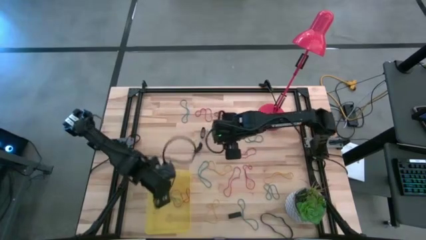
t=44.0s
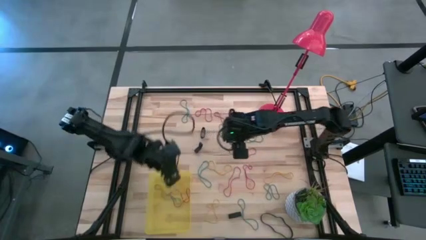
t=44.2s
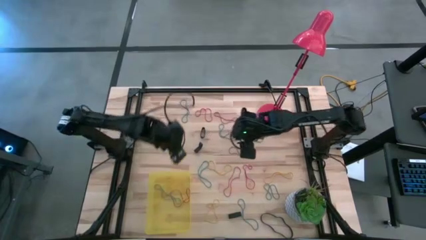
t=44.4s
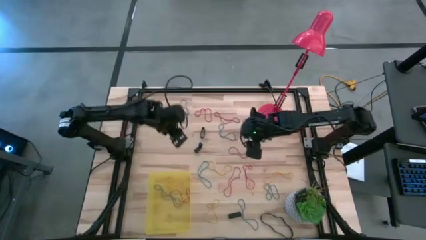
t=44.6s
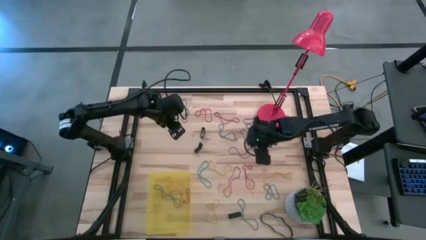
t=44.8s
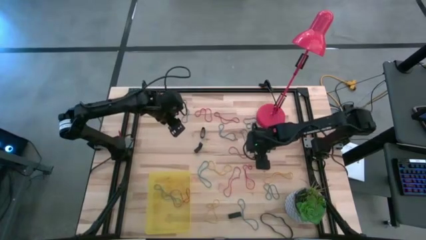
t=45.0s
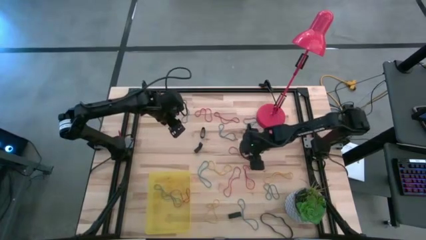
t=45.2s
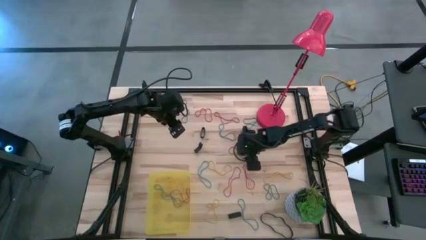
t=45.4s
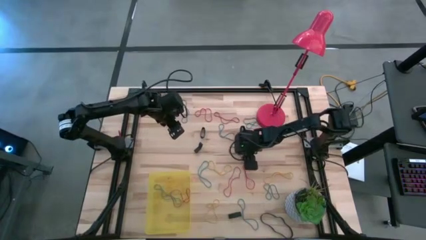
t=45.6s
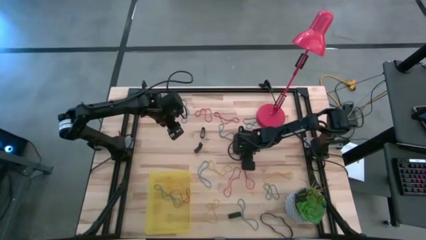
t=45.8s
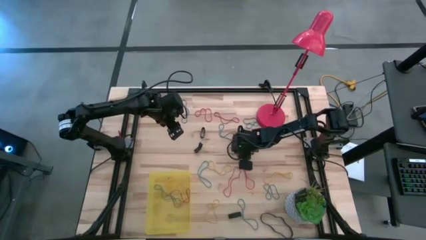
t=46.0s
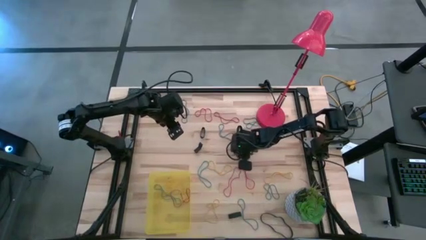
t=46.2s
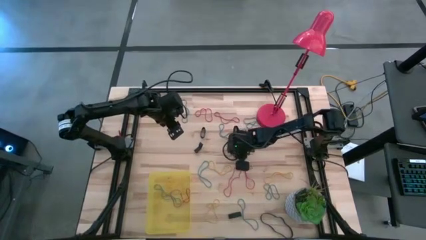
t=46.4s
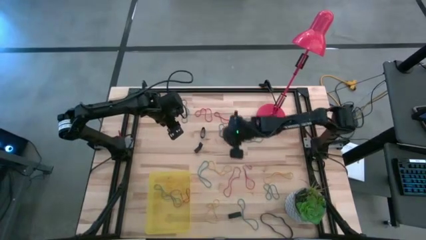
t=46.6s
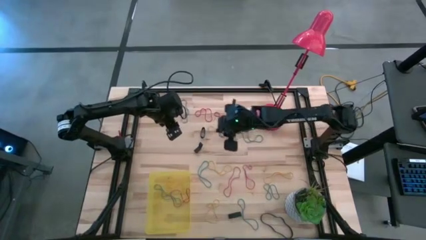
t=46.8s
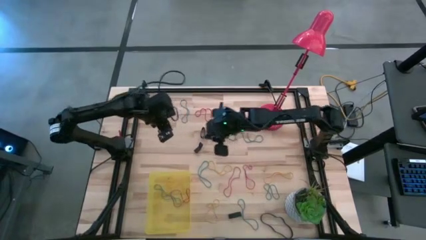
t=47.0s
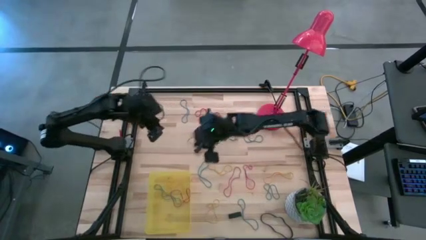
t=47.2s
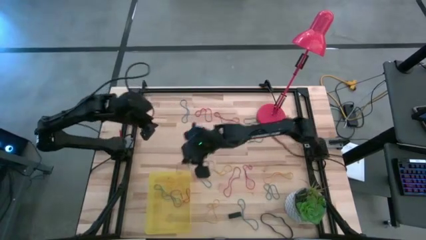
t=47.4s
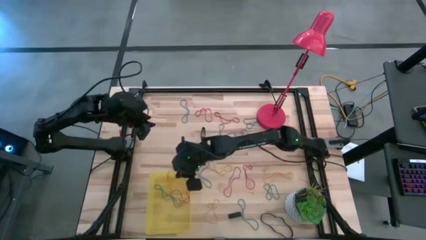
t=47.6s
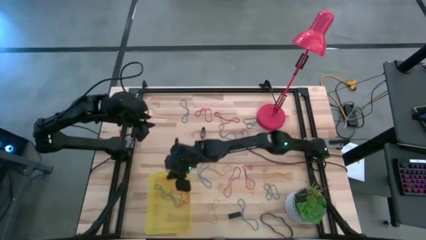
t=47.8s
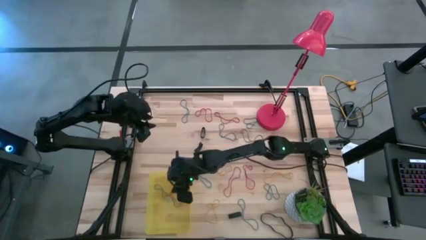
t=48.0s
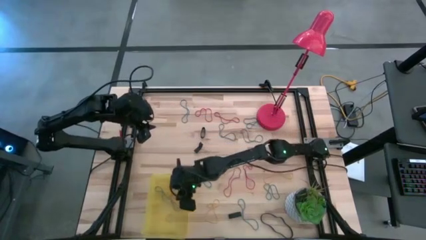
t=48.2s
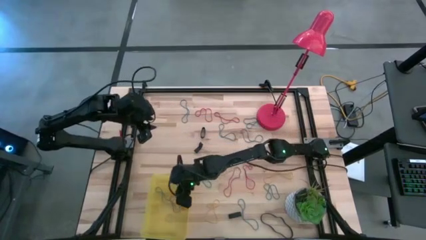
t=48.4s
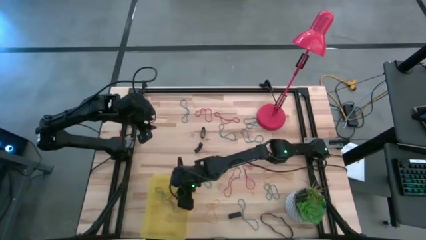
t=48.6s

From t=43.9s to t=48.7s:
Task: Pick and place rubber bands into bin
Put the red rubber band into the bin

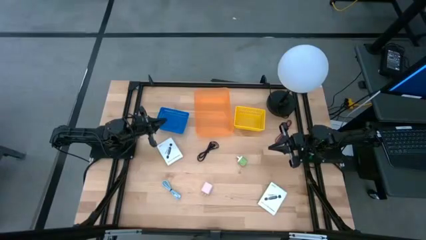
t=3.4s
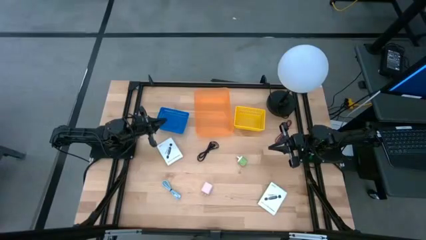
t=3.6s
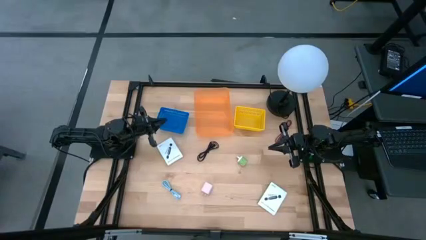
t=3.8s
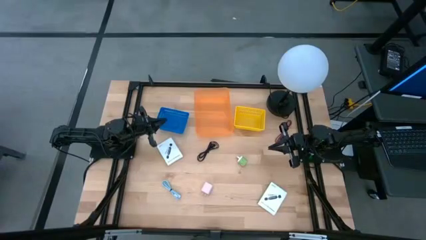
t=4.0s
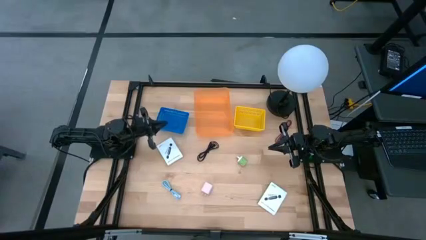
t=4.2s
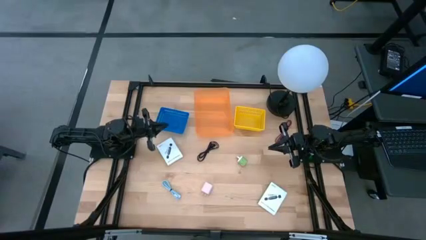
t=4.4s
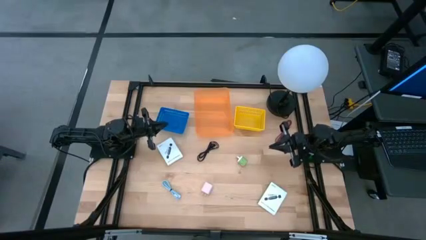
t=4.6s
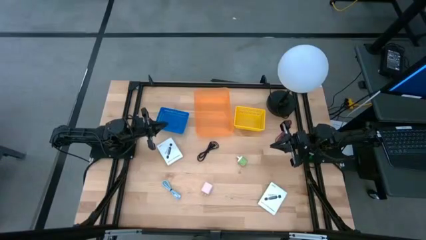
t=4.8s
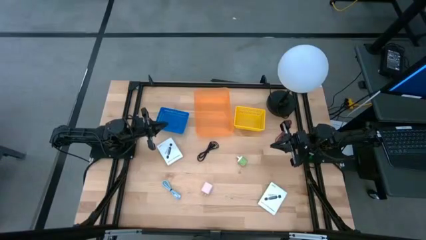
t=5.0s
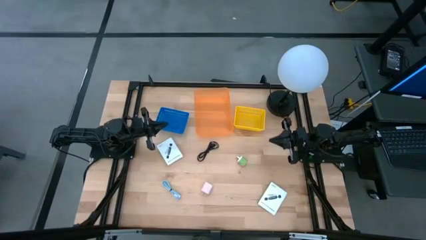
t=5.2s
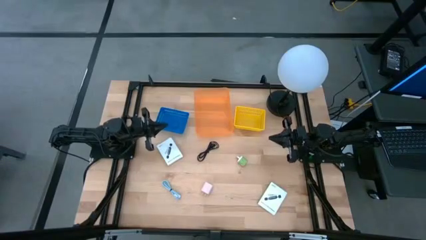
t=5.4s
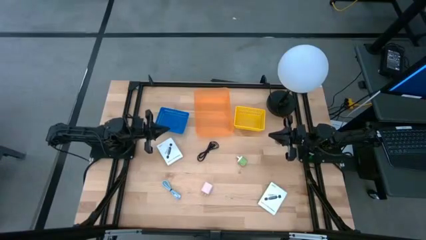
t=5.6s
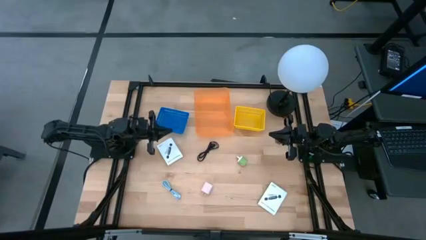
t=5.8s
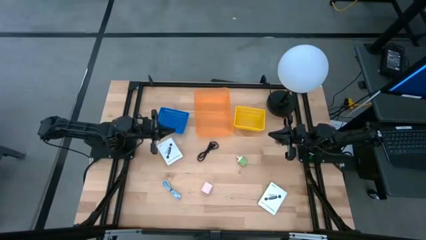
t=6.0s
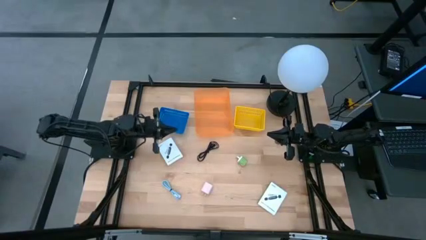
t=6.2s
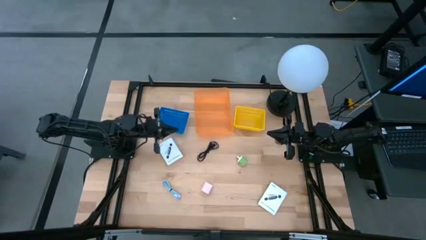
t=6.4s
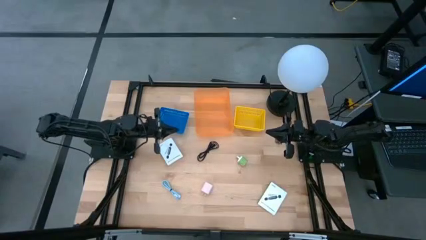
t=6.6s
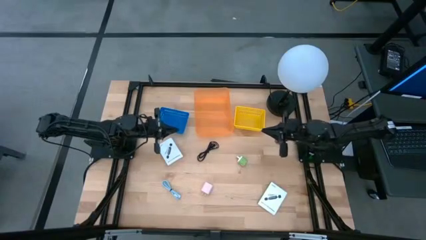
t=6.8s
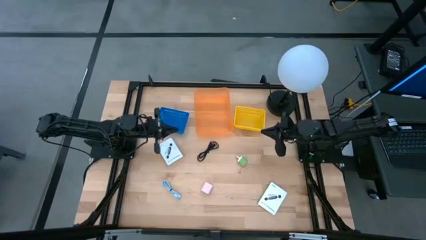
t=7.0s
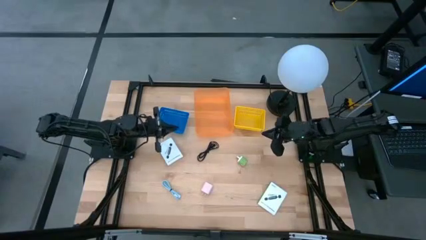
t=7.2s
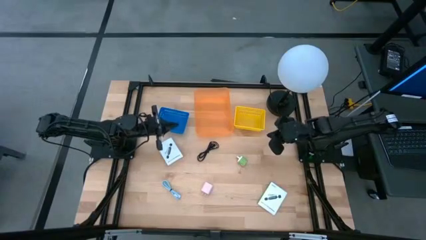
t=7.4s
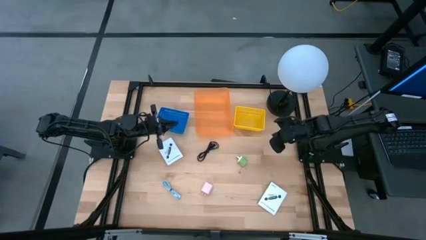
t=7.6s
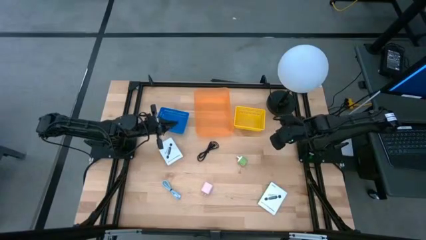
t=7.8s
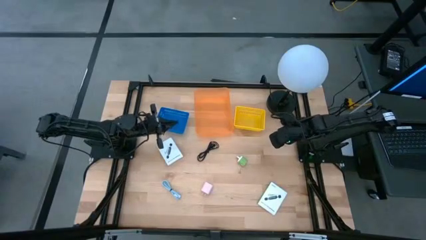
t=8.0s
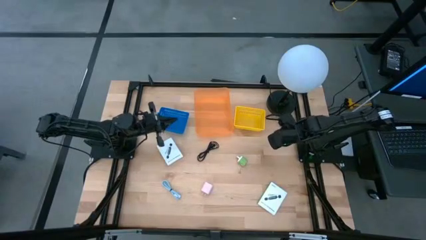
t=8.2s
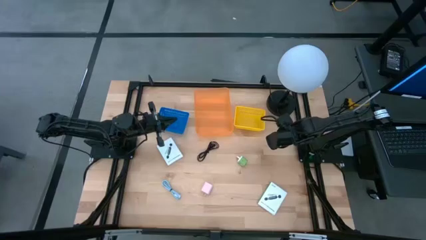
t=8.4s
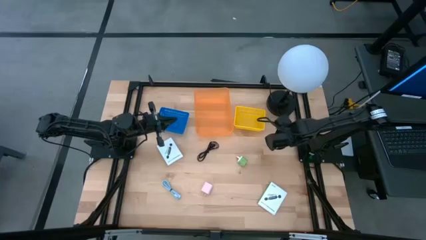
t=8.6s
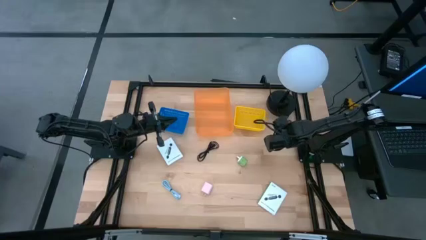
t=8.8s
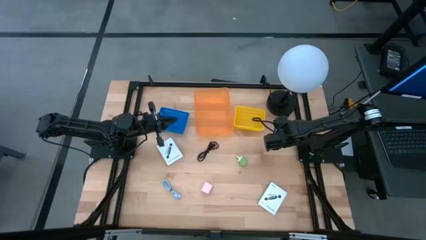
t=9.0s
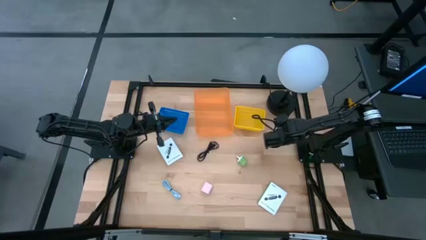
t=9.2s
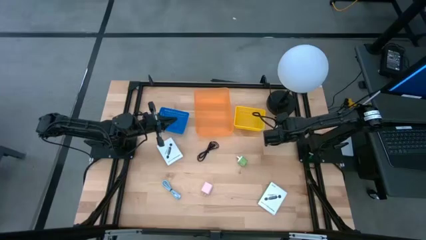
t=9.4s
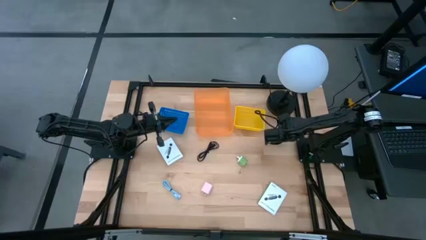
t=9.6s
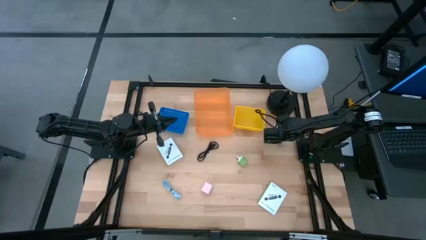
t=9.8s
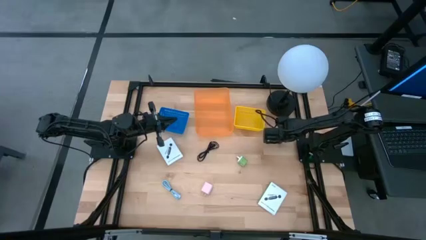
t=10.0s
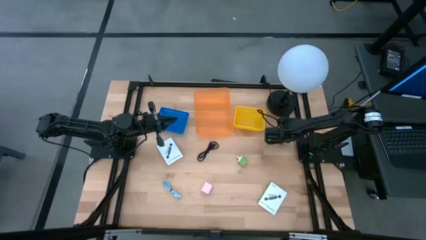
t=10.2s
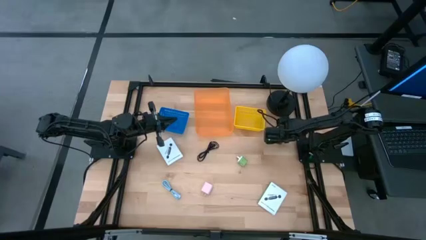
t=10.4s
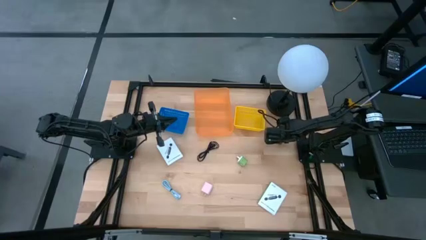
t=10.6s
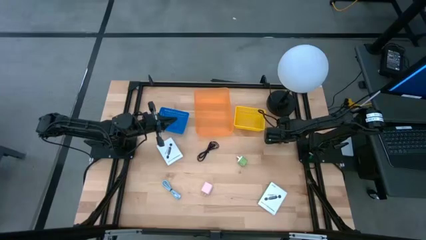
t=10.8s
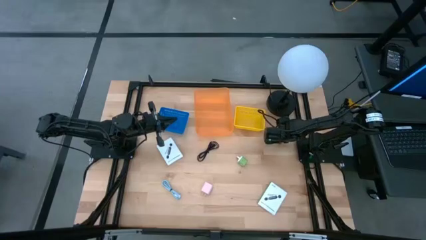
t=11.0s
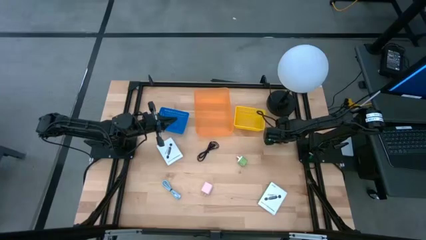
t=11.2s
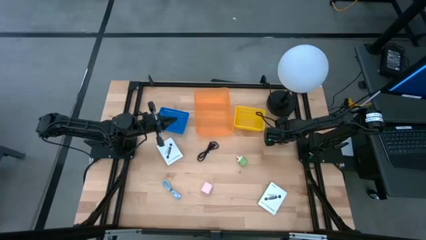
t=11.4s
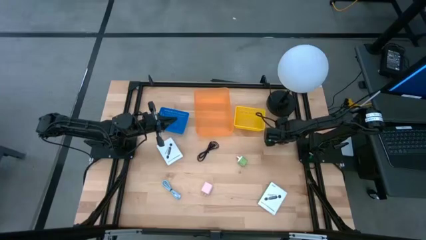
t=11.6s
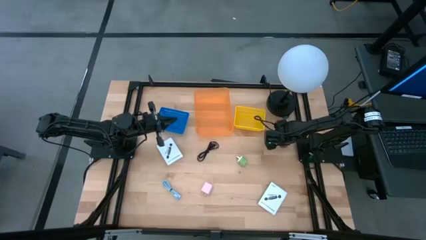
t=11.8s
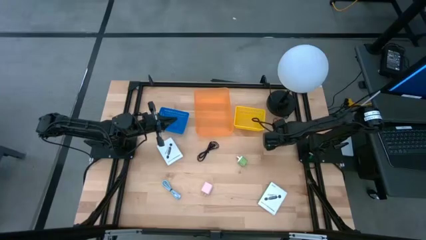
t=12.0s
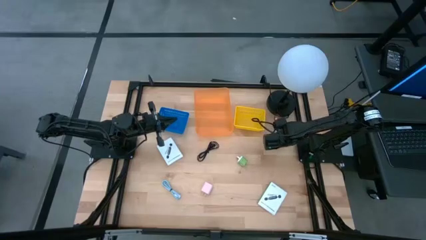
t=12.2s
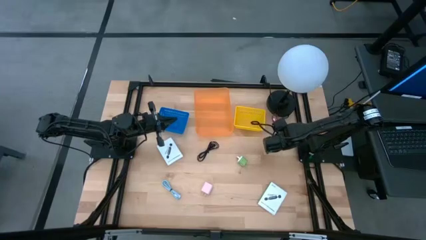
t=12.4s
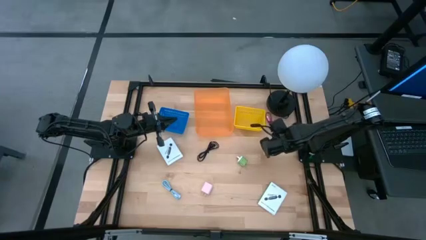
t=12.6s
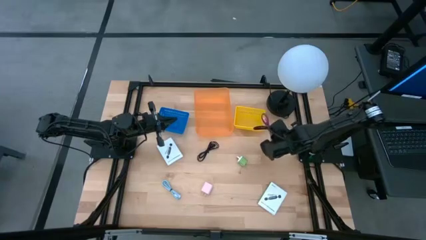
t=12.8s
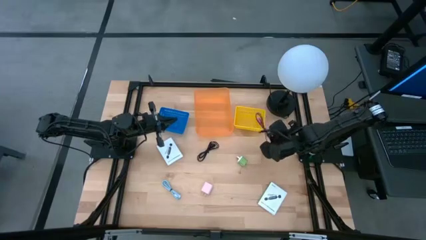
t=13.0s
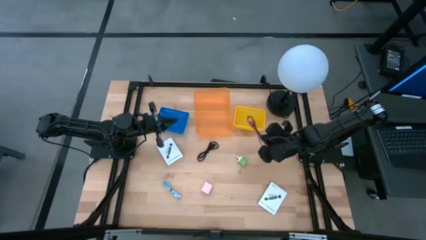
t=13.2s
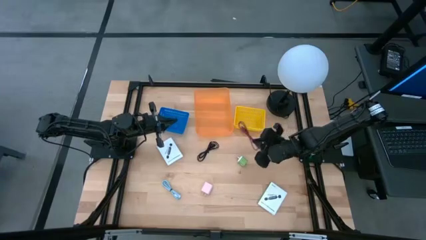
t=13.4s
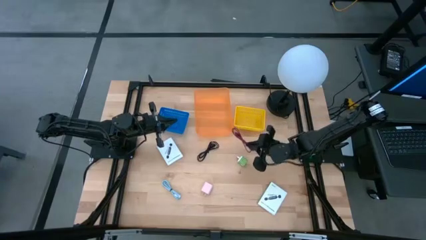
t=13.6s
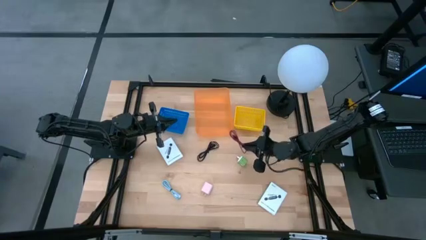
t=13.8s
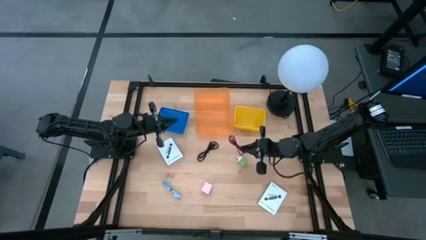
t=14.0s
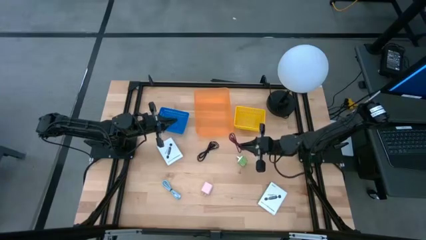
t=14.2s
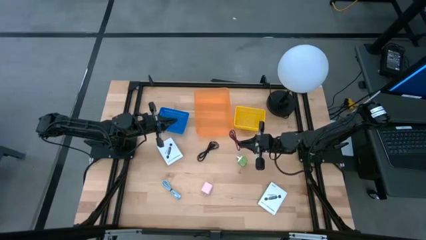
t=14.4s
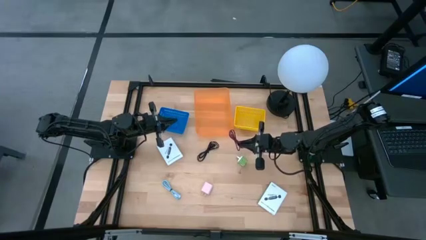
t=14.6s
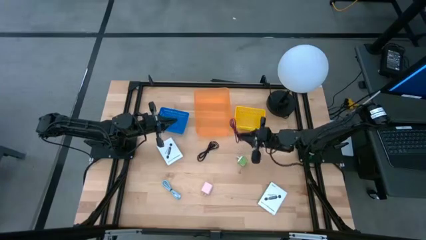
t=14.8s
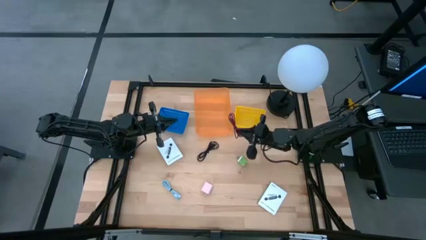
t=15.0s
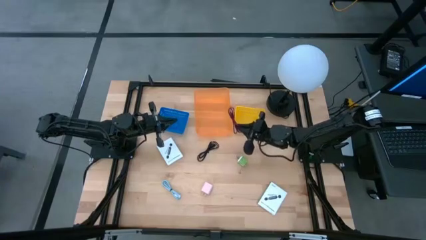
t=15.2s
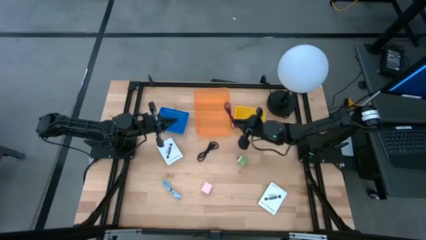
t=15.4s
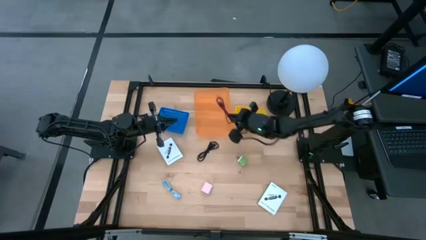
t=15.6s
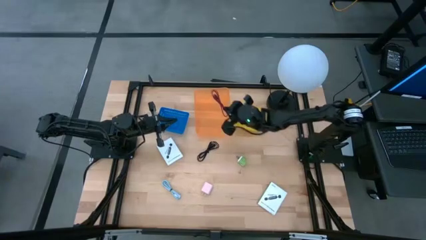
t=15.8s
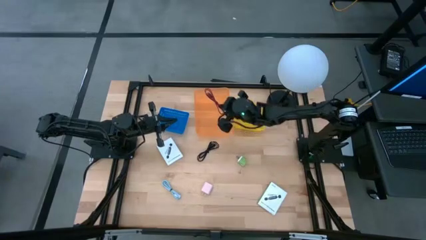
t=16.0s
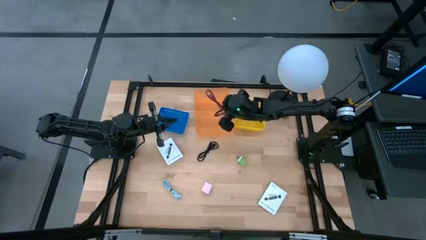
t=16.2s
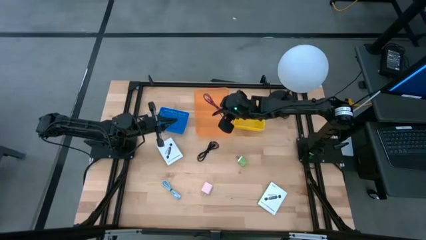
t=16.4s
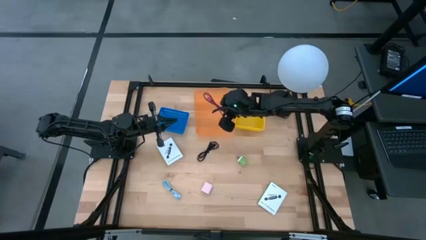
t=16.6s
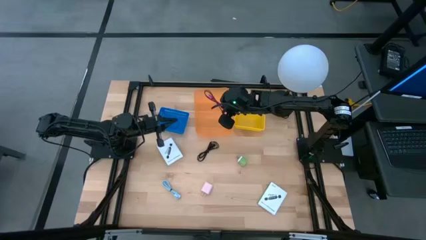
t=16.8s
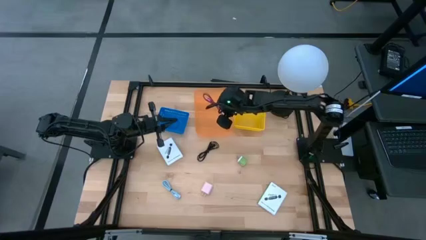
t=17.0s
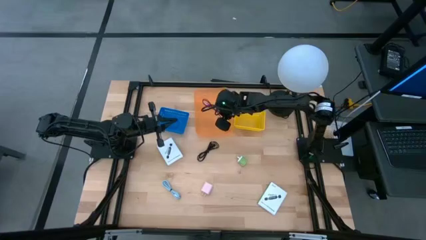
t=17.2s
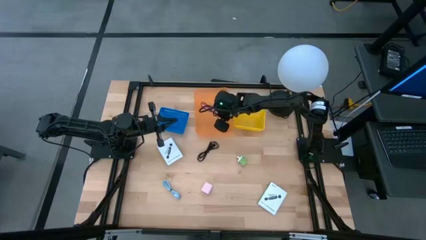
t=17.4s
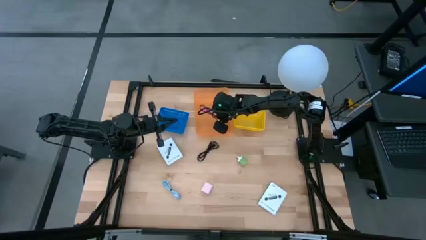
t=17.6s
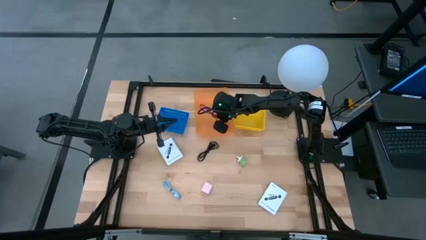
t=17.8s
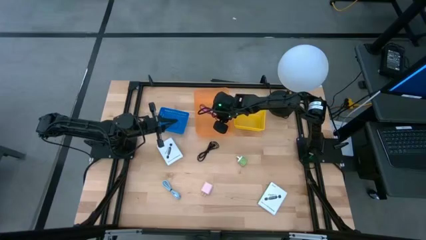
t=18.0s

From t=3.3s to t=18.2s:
Task: Pick and place items into bin
Put the pink charger cable into the orange bin
